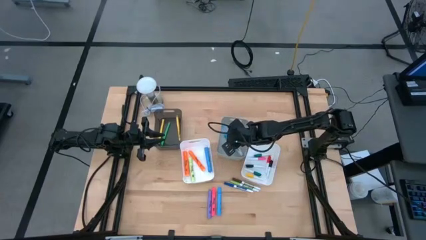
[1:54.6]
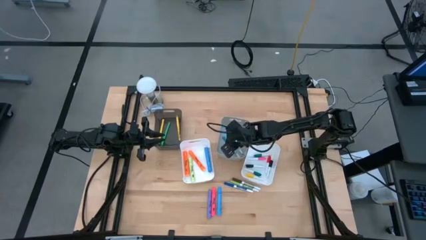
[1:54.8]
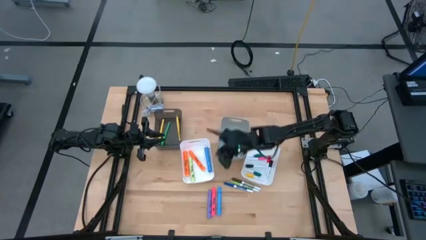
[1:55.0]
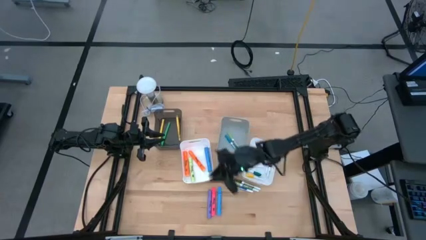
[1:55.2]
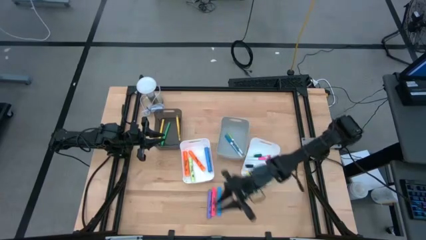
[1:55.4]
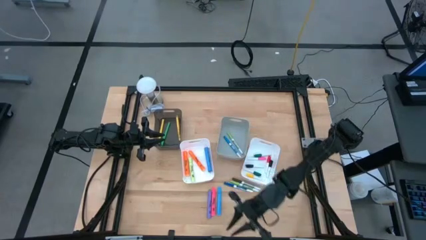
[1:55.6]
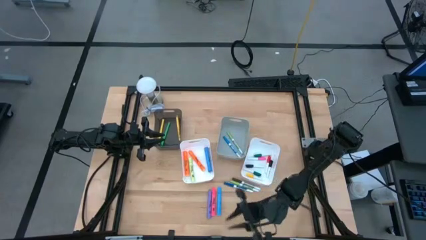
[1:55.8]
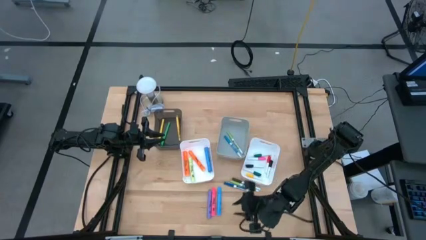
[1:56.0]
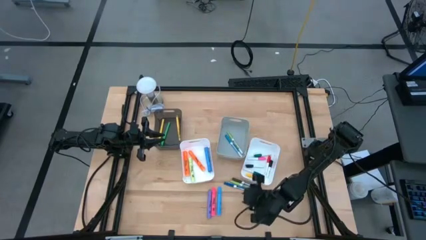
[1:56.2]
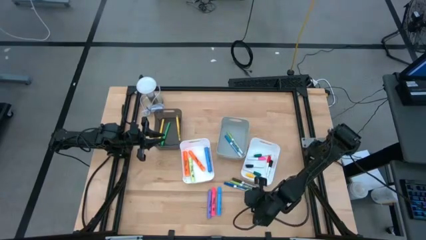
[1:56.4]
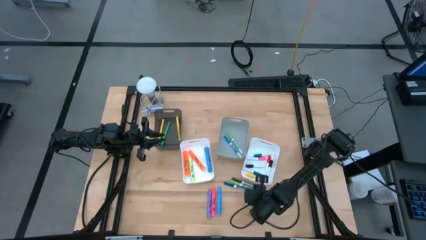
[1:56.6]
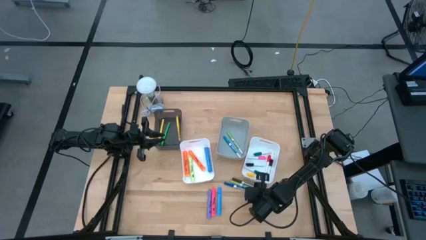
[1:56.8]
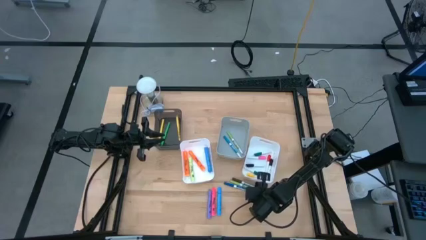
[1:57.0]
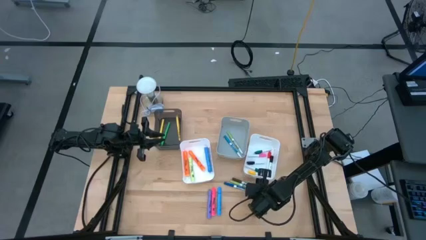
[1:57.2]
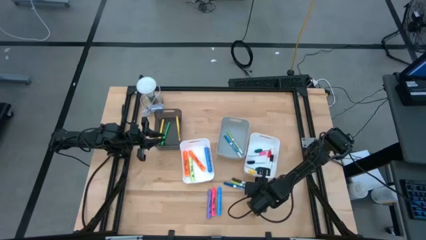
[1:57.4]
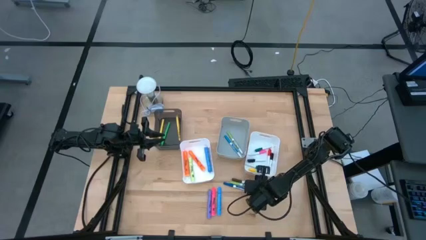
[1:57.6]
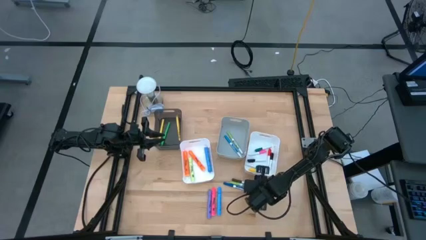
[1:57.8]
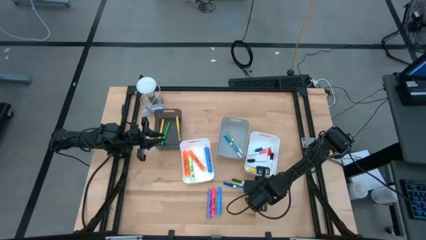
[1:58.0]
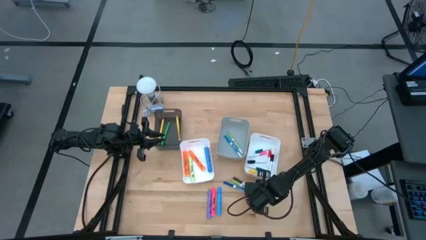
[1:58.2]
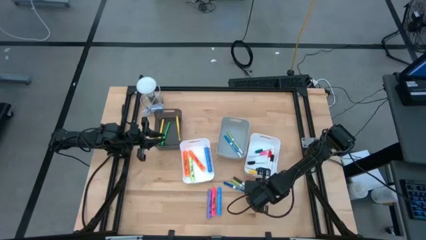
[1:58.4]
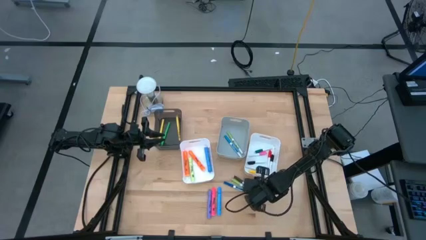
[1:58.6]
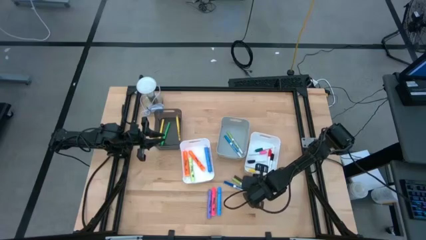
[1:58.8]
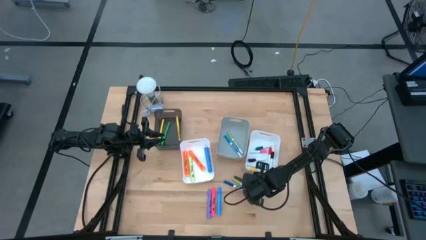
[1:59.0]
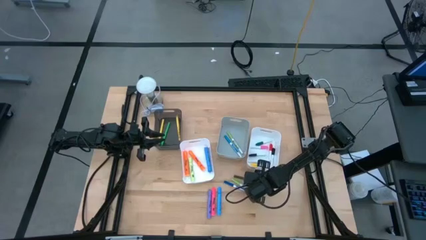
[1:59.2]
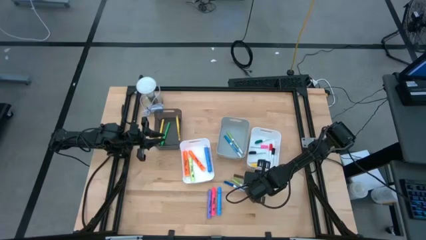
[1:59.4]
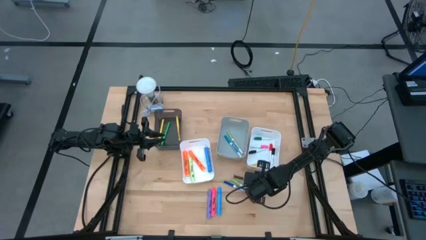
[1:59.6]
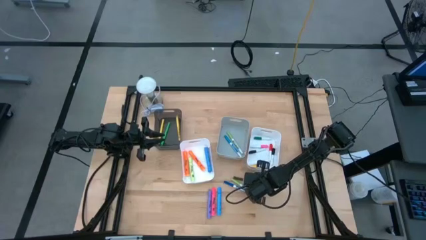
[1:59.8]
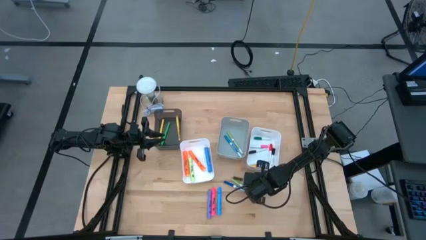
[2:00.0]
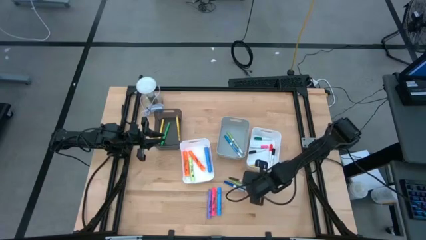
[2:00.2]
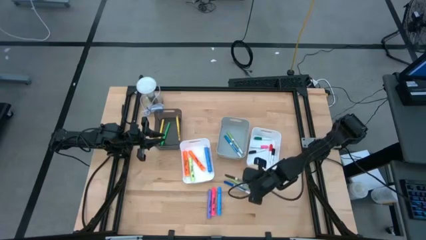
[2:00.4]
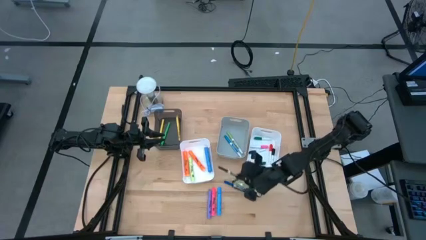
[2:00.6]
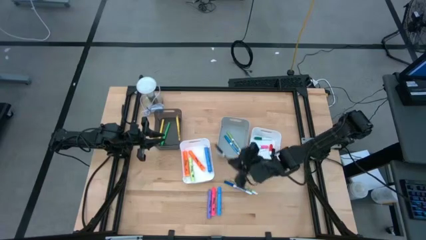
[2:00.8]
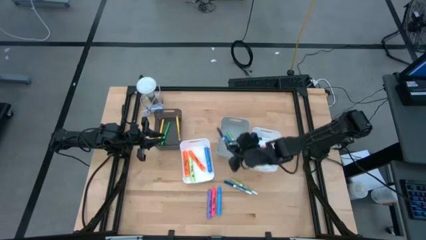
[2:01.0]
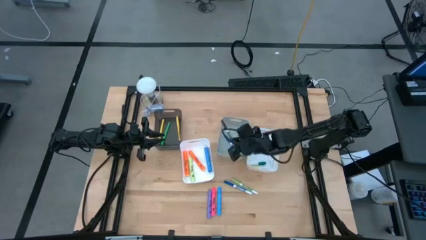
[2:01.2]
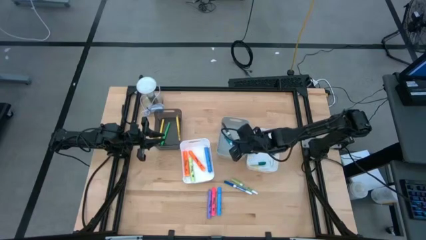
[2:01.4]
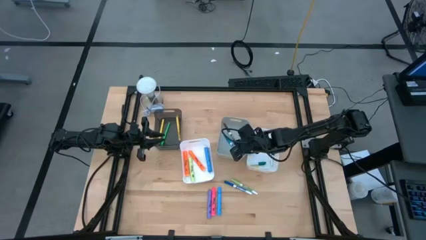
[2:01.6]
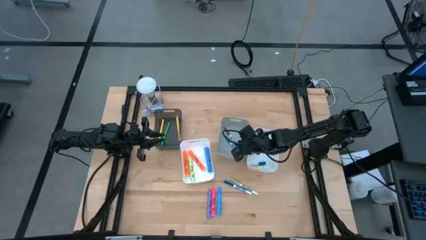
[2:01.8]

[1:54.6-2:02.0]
Task: Pick & Place Markers
Put the brown dry erase marker into the gray bin

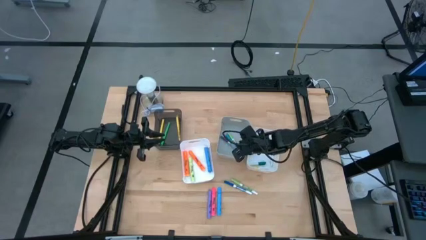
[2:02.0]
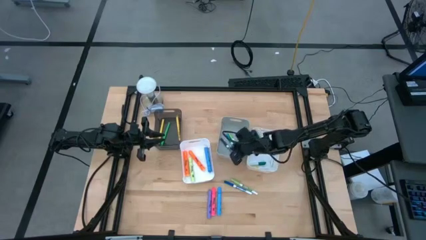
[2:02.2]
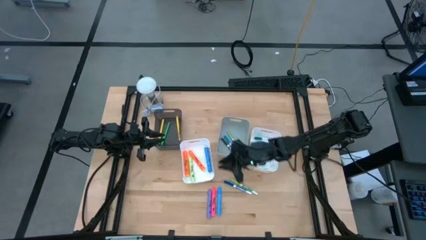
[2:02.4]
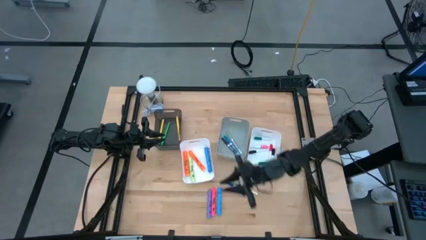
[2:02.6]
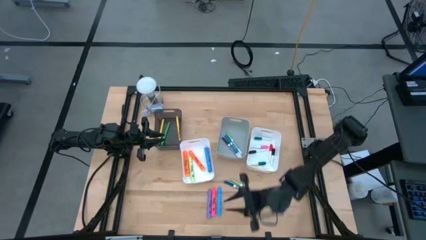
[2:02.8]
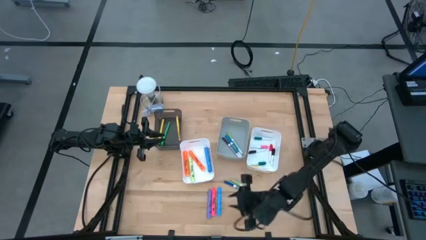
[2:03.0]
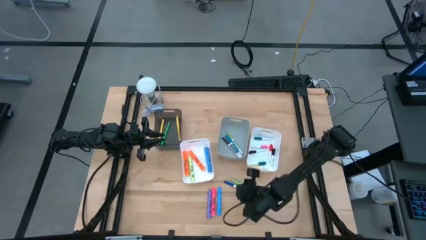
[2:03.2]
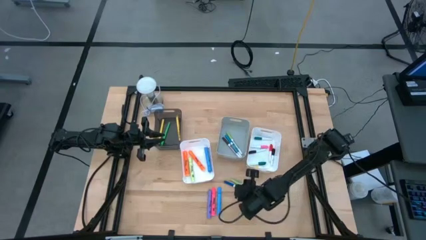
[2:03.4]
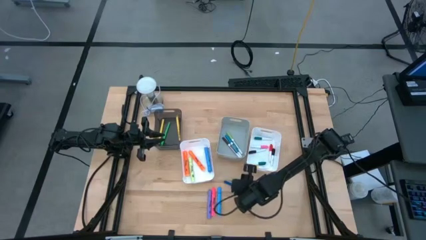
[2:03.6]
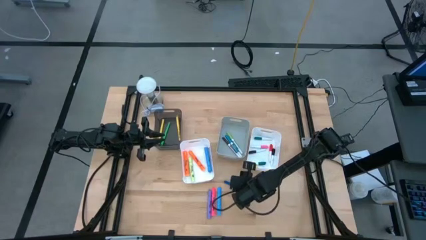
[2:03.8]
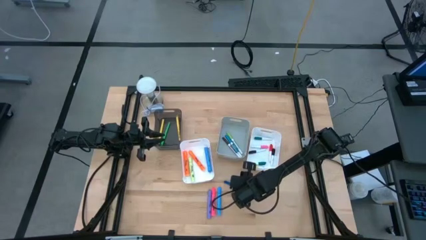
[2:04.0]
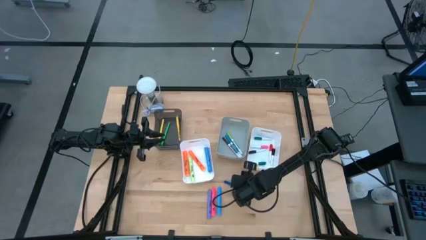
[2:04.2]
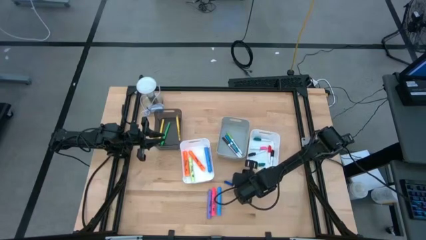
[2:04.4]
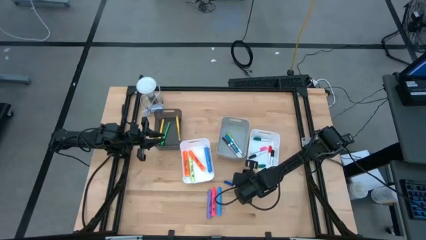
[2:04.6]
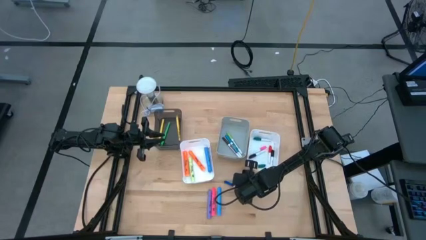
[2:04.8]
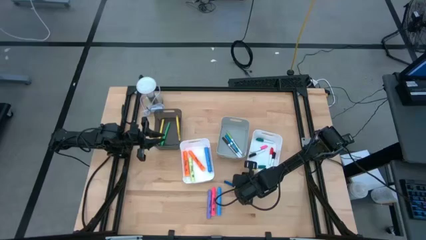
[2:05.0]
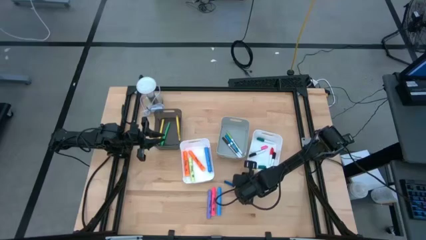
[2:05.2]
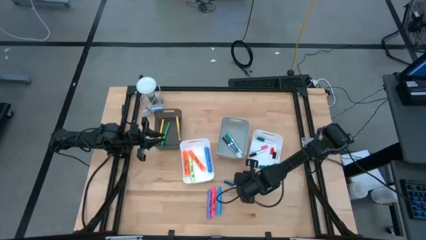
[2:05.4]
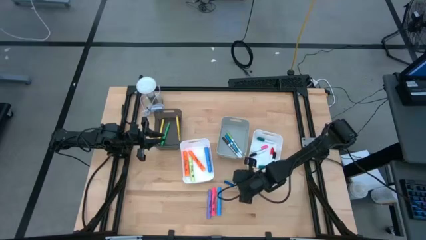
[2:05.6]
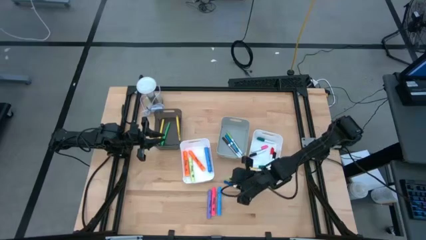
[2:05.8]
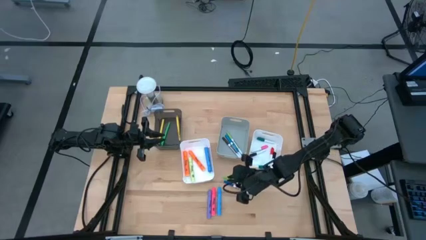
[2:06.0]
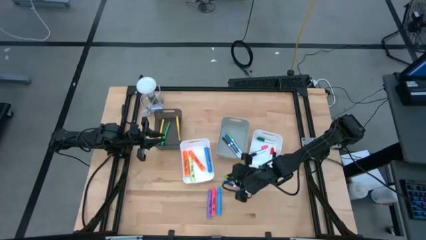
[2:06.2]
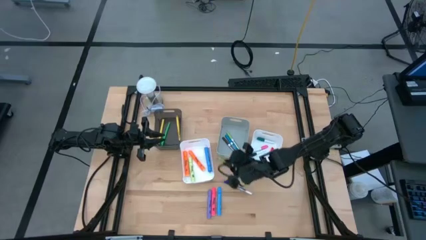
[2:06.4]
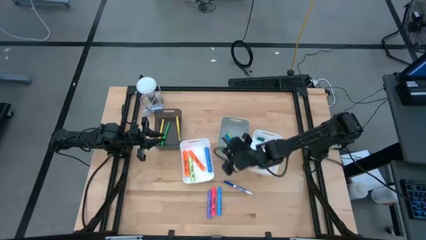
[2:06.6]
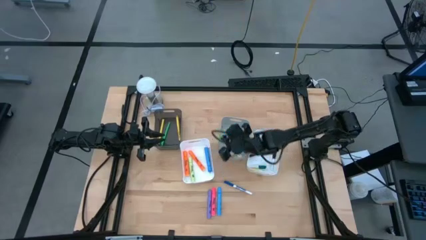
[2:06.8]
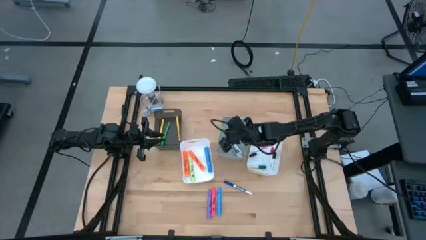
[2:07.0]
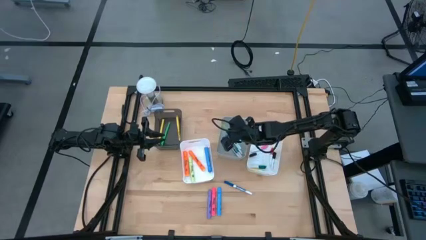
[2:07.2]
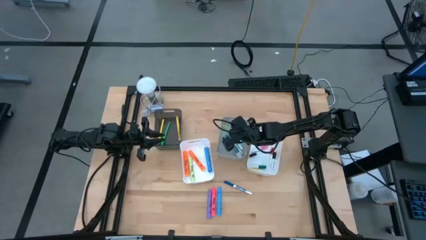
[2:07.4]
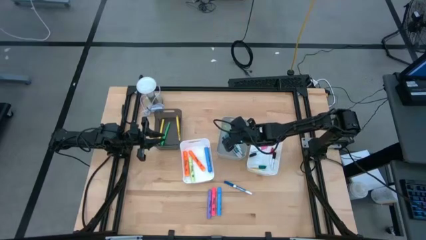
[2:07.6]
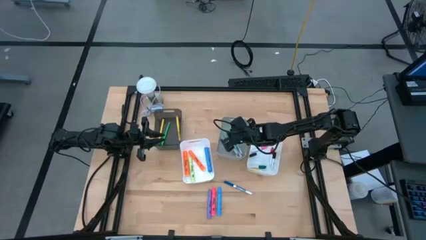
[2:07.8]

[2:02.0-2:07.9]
Put the green dry erase marker into the gray bin

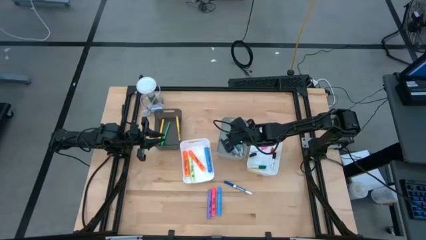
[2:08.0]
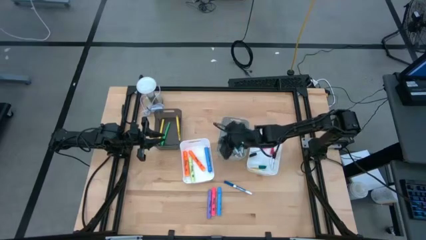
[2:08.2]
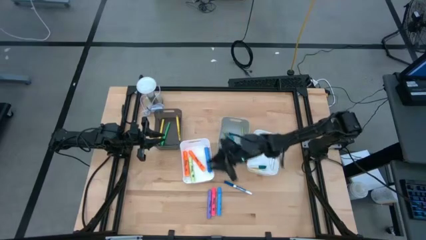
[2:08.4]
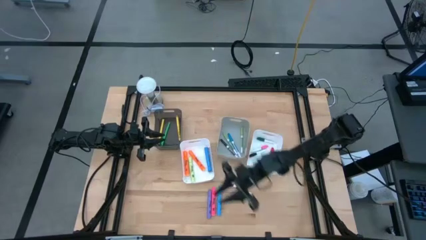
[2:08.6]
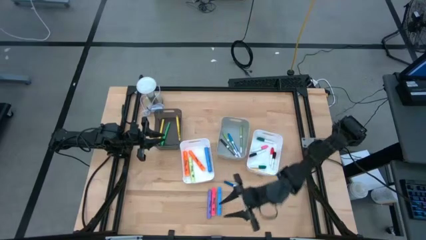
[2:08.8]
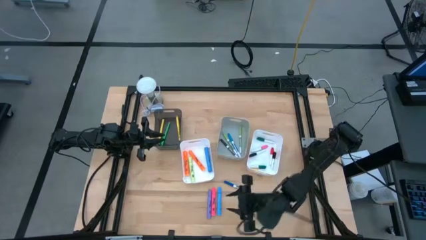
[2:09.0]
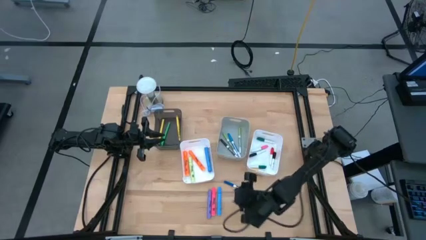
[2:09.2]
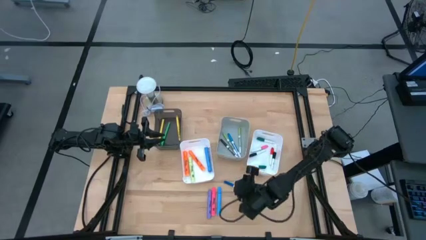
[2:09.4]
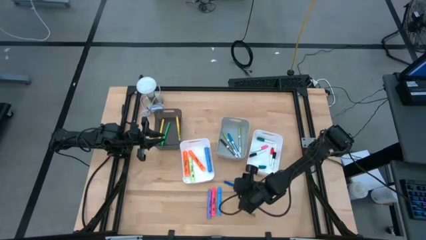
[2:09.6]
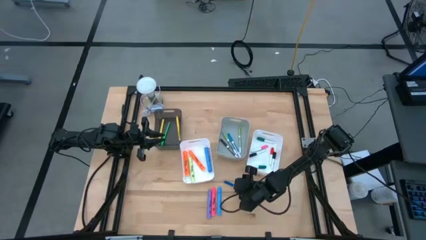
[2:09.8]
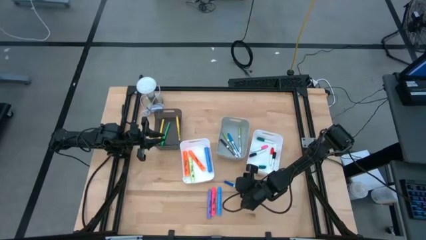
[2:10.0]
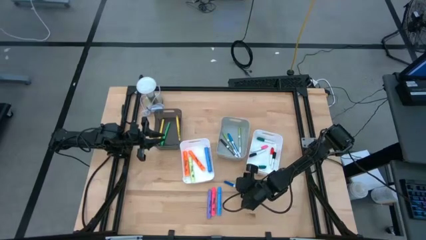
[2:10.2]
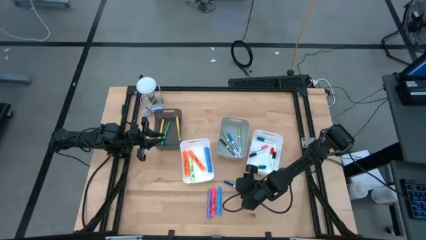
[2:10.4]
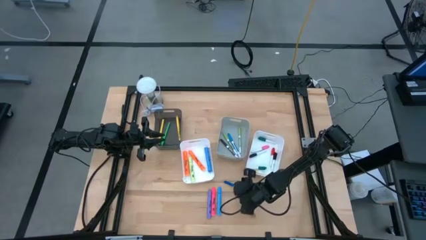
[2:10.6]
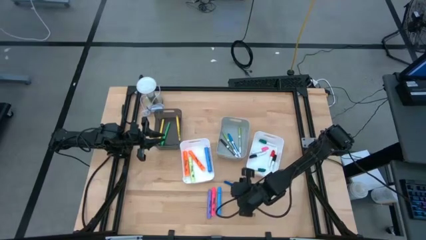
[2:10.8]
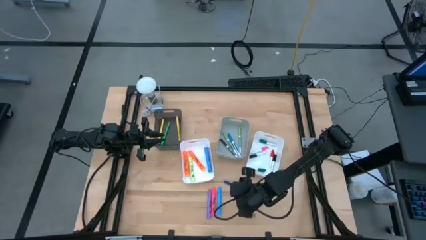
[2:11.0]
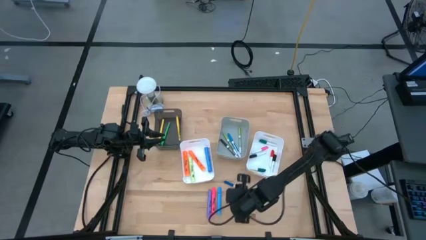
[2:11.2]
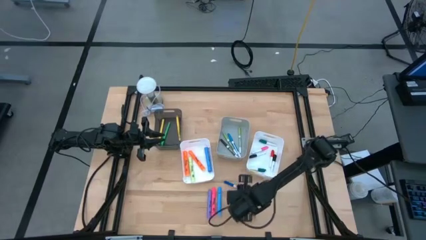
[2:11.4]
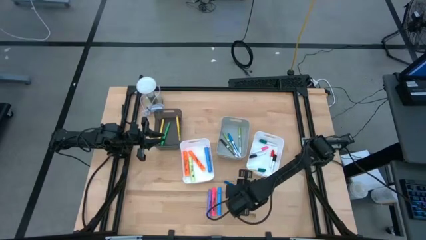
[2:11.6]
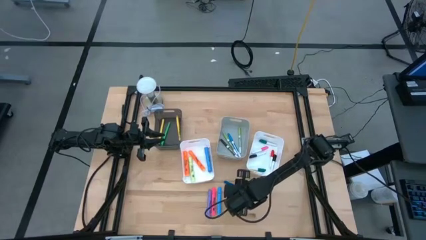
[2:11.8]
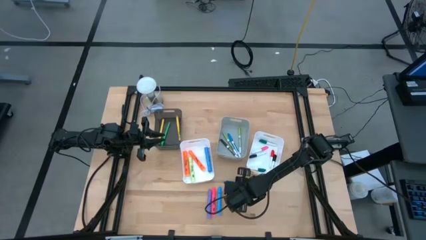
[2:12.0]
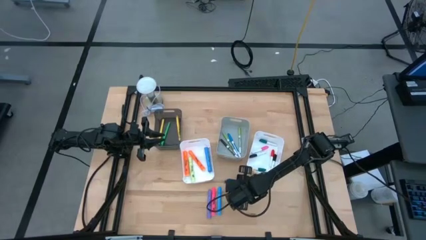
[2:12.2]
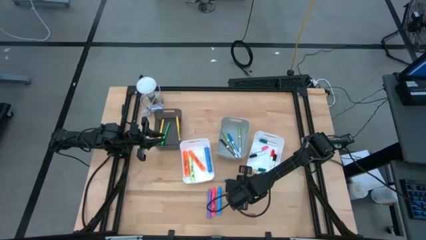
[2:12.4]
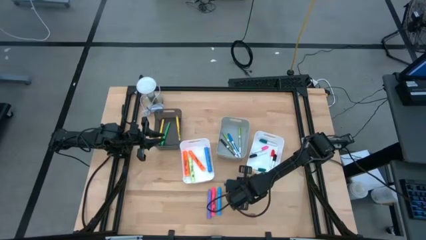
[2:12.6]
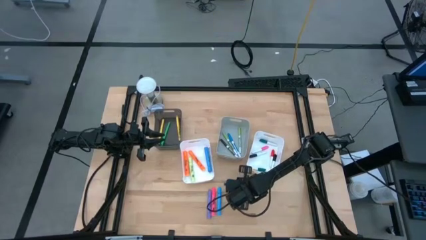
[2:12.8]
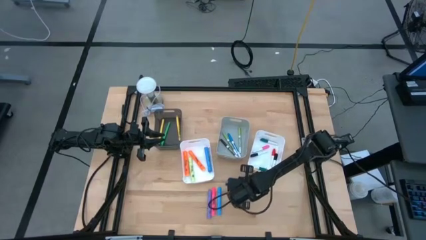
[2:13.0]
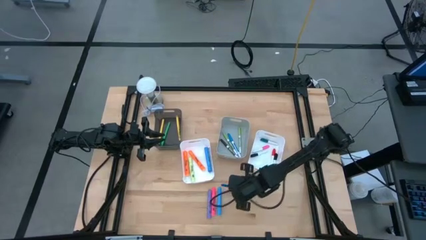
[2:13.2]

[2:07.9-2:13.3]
Put the blue dry erase marker into the gray bin
